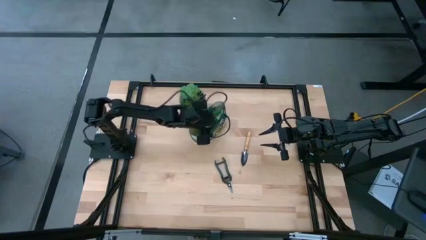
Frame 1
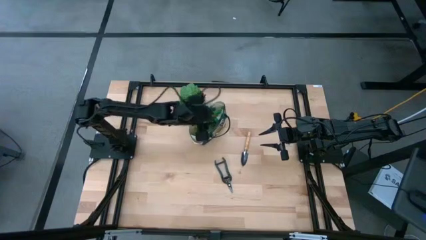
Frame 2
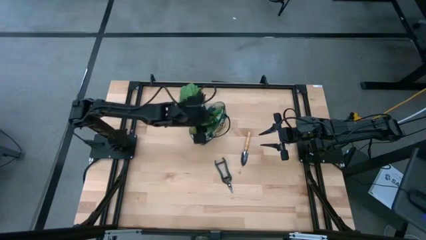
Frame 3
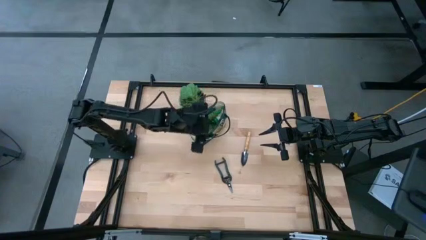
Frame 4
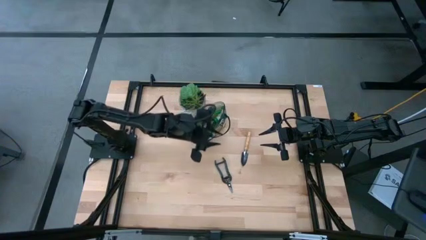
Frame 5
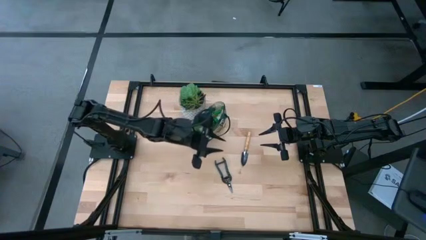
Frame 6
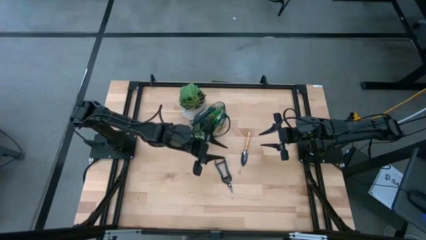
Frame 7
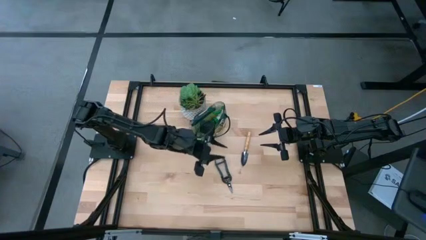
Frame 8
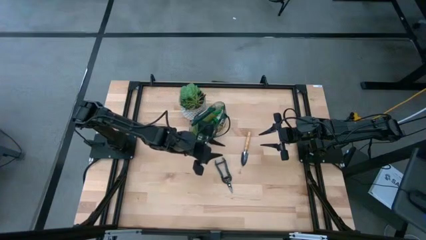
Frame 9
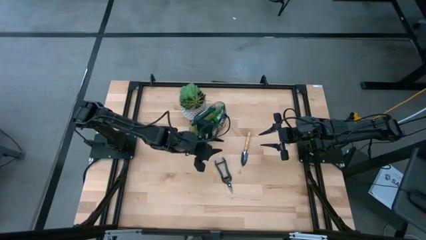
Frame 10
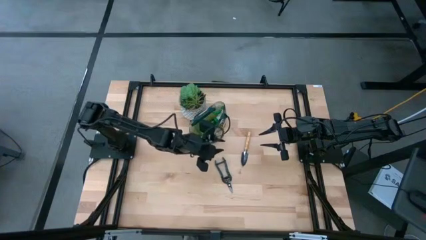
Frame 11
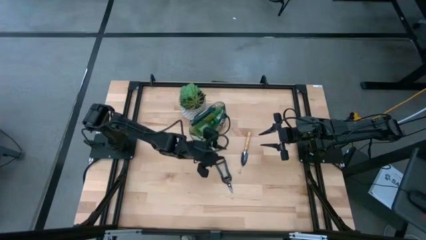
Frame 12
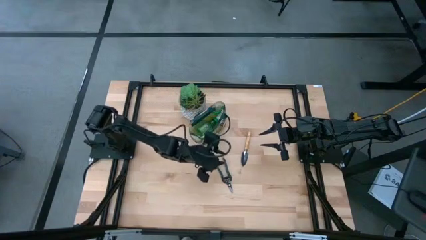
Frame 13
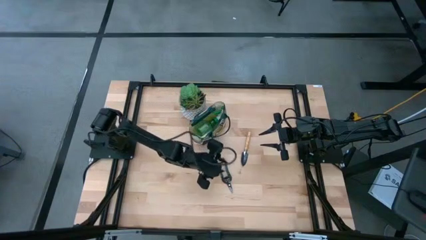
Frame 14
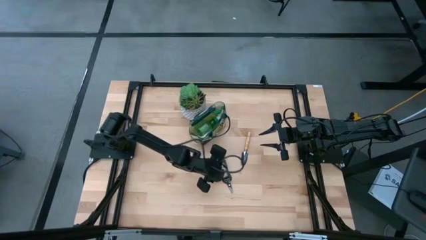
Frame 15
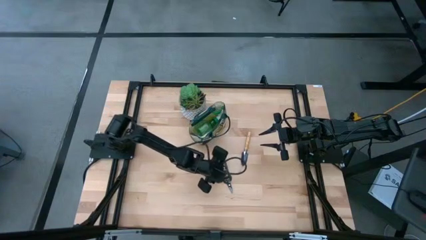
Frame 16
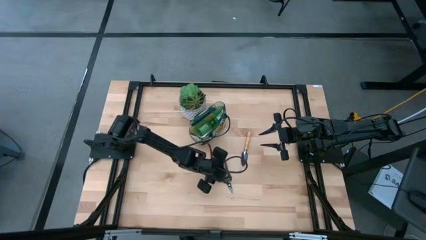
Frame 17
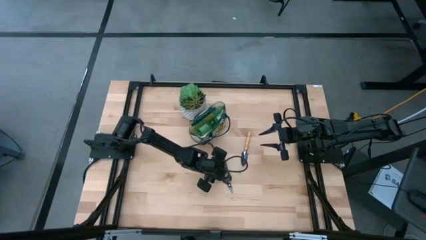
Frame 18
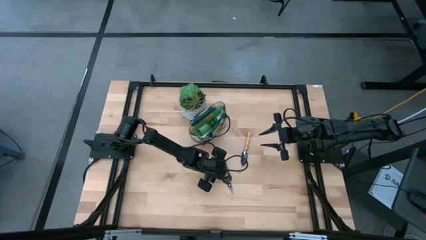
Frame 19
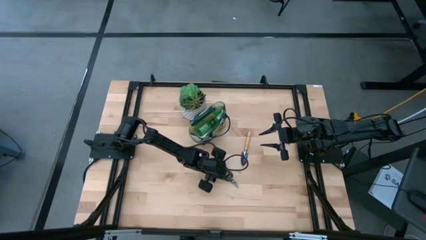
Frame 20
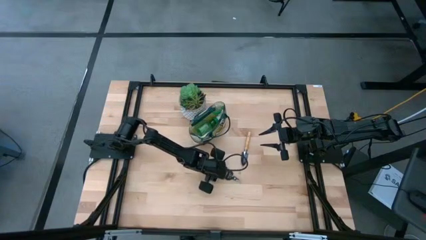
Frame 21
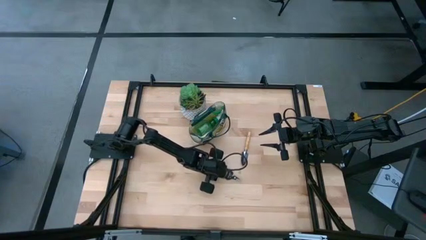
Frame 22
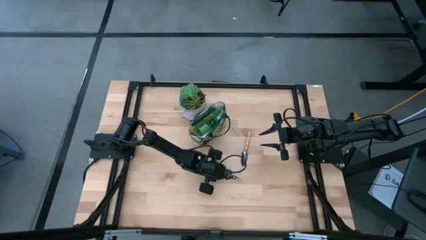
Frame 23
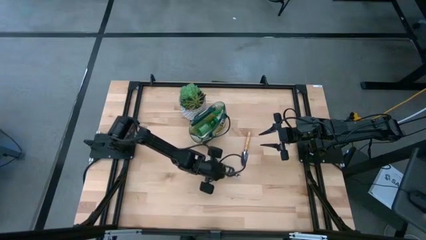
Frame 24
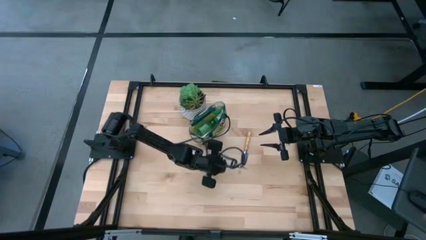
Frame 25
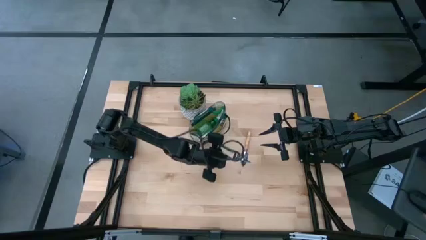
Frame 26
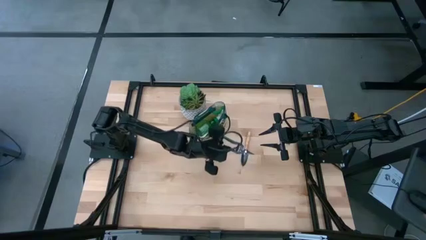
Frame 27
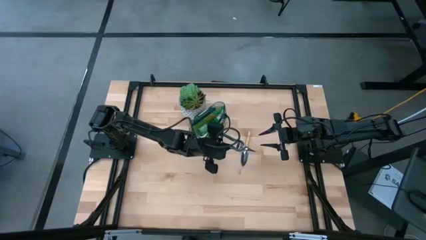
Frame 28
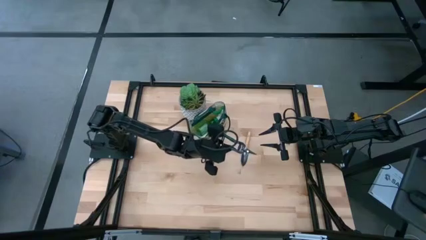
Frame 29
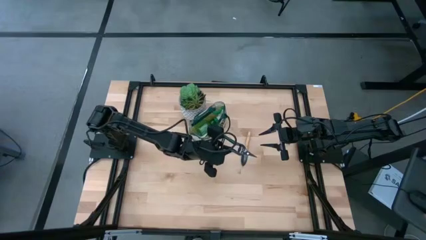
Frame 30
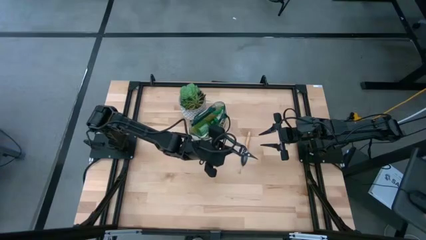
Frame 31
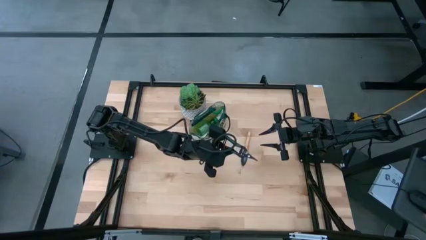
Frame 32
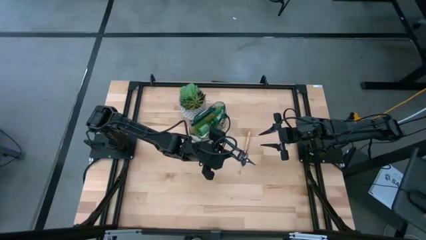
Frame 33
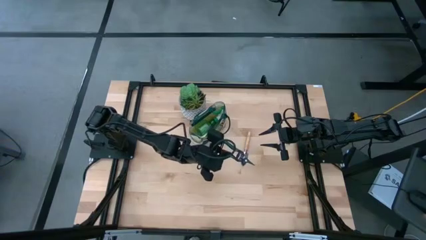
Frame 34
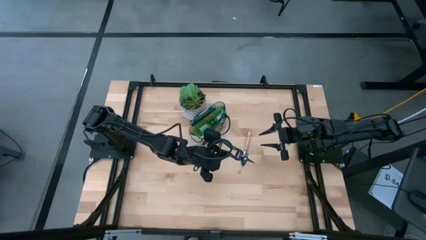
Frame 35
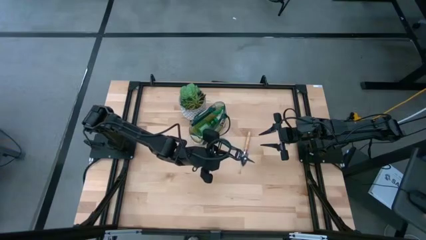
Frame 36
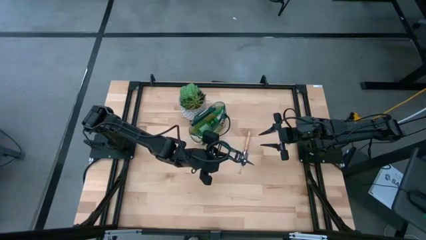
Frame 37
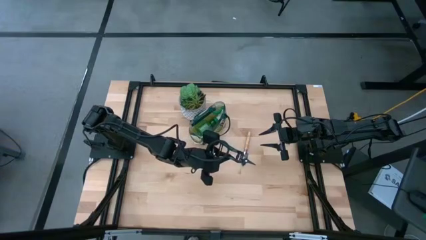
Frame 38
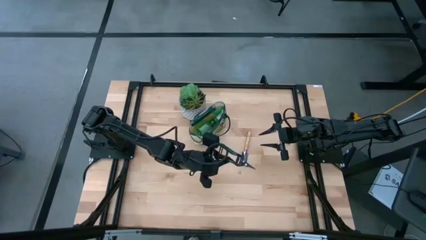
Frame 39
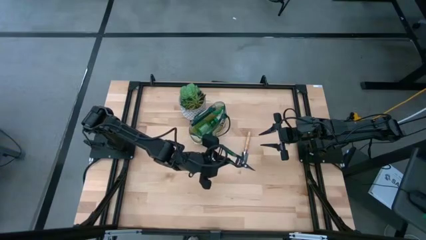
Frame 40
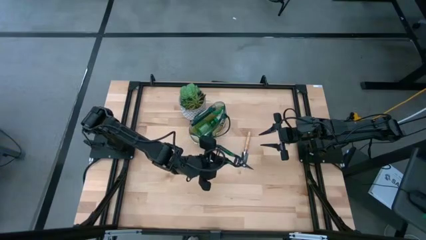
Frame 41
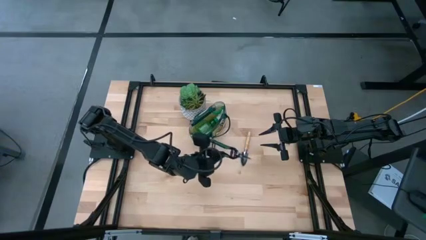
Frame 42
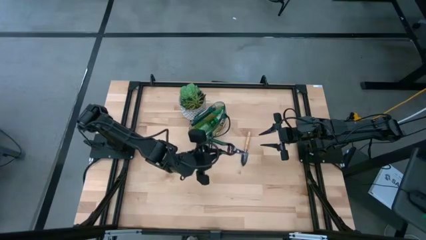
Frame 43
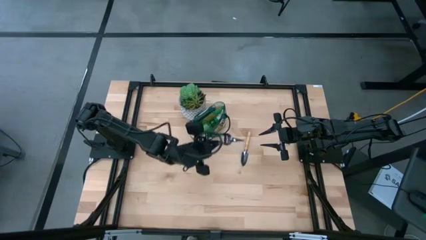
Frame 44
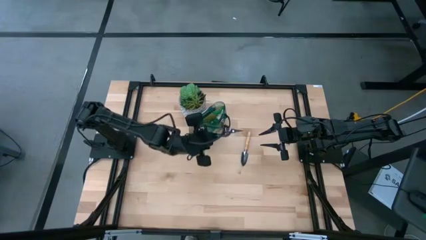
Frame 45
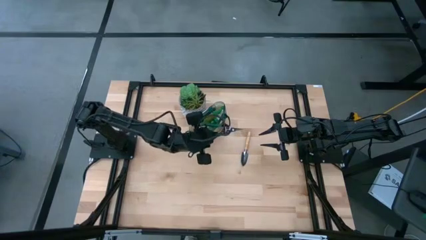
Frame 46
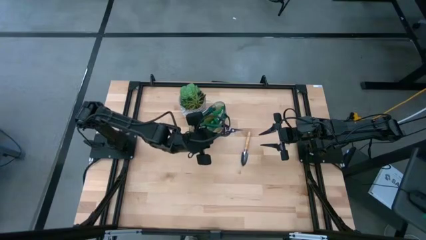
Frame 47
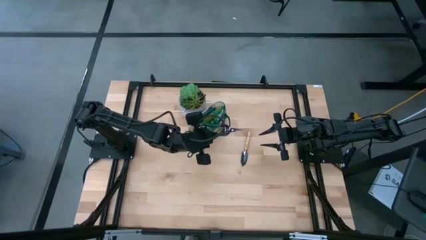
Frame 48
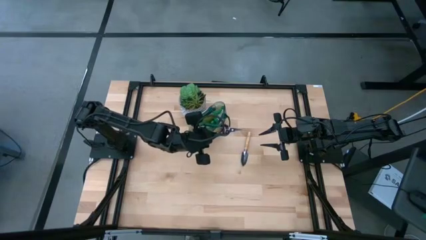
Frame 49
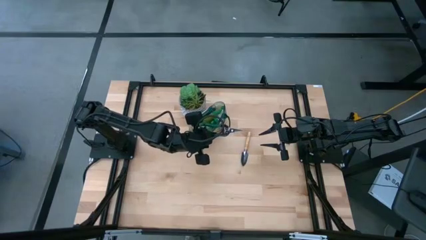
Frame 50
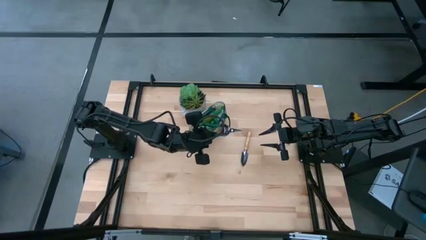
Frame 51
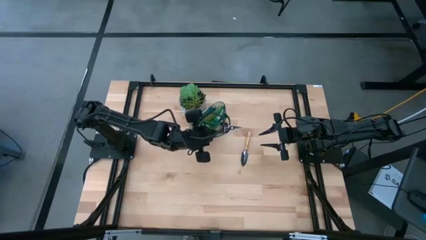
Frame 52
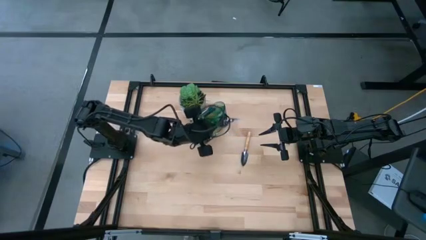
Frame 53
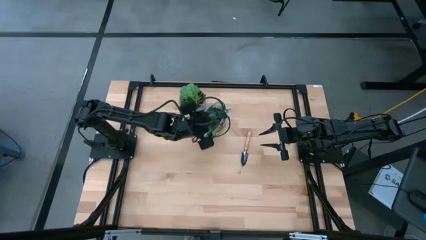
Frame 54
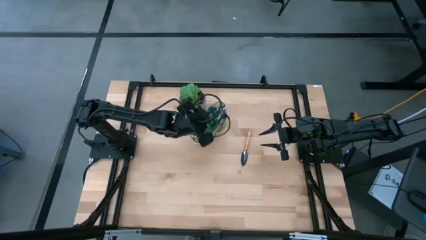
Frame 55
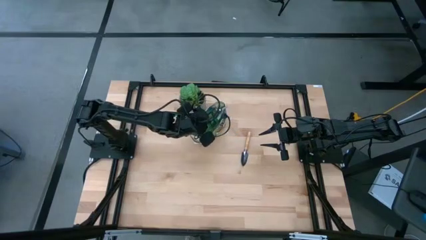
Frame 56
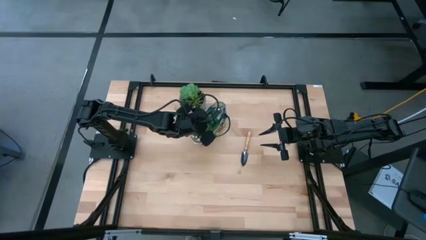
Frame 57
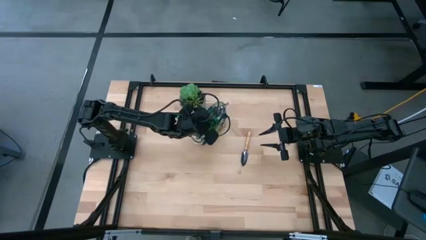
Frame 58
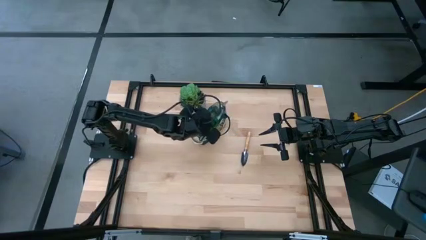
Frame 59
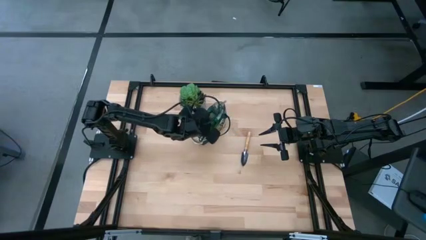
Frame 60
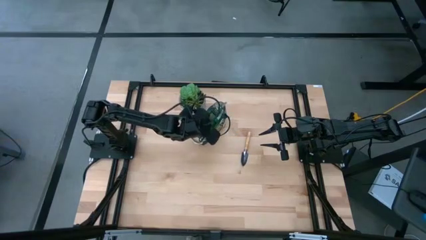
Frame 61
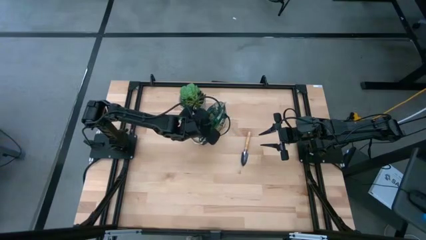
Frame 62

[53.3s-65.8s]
Task: Pick & Place Garden tools in Gardening bag
Put the green fruit pruner into the white gardening bag
